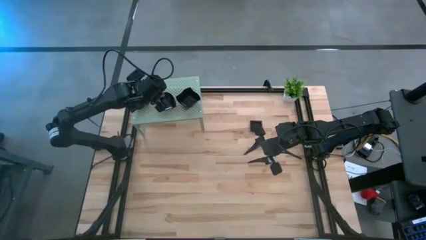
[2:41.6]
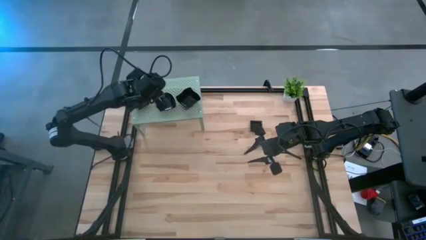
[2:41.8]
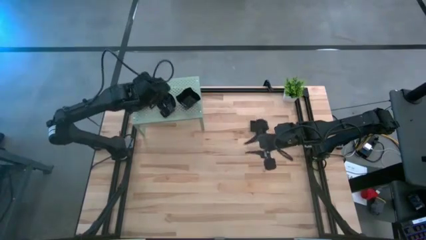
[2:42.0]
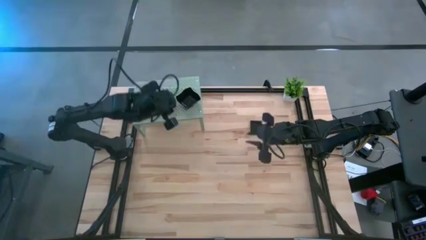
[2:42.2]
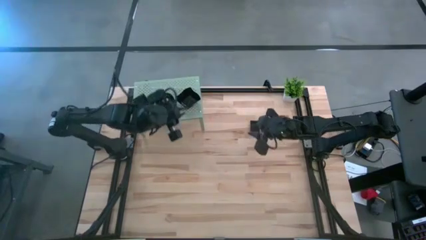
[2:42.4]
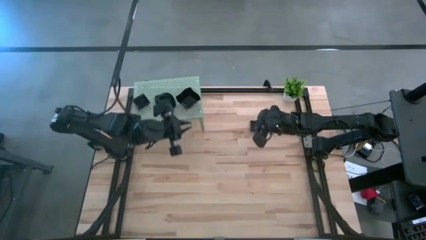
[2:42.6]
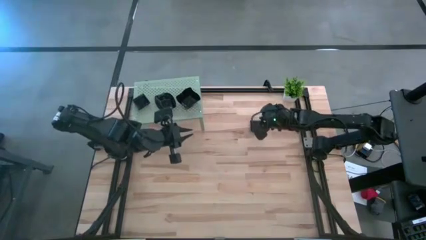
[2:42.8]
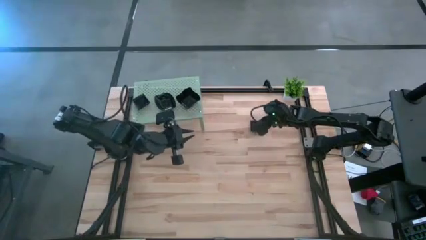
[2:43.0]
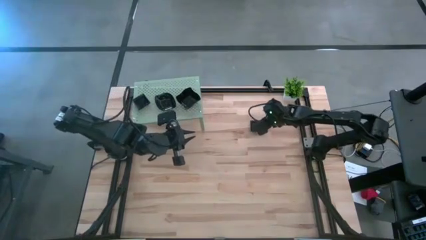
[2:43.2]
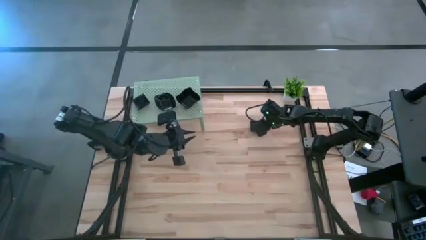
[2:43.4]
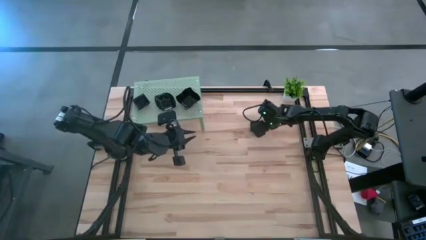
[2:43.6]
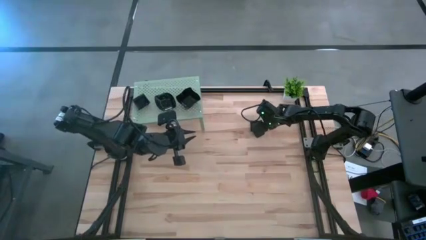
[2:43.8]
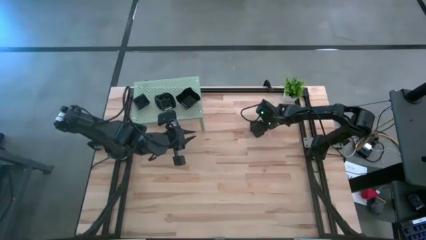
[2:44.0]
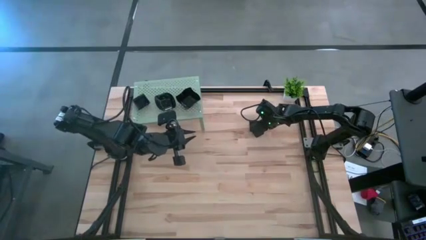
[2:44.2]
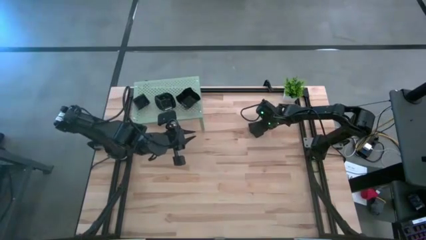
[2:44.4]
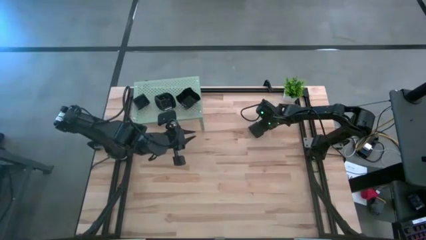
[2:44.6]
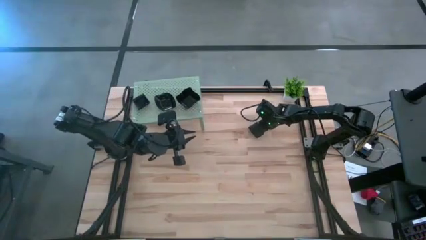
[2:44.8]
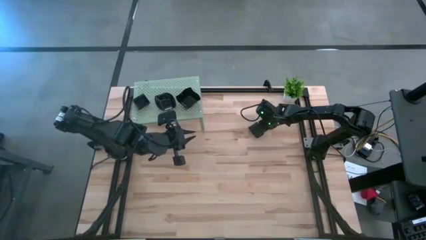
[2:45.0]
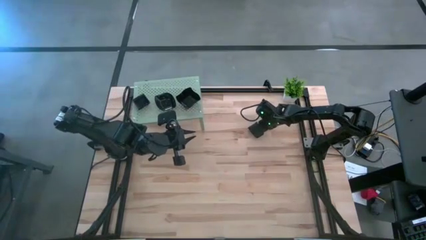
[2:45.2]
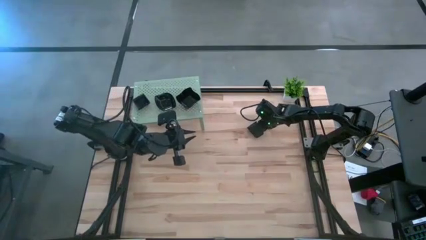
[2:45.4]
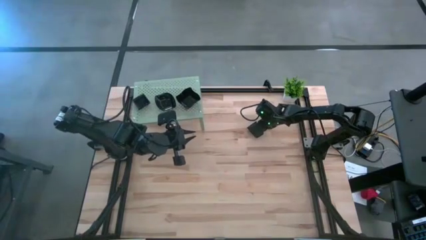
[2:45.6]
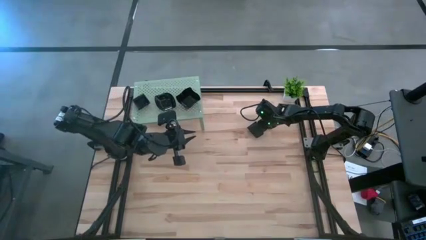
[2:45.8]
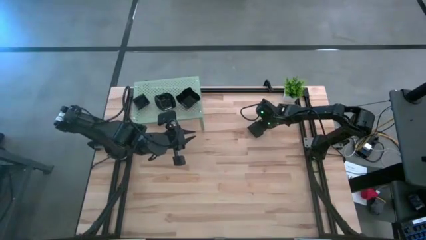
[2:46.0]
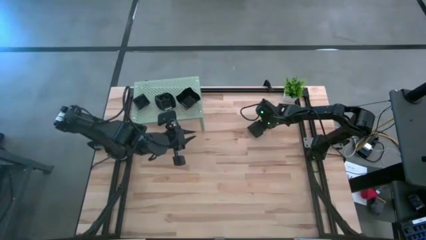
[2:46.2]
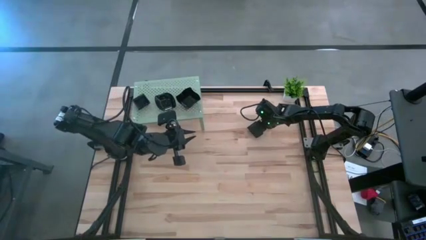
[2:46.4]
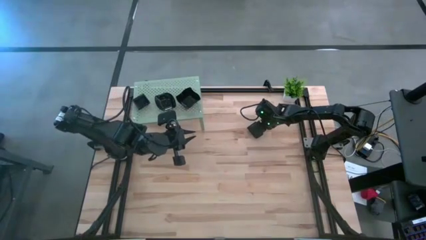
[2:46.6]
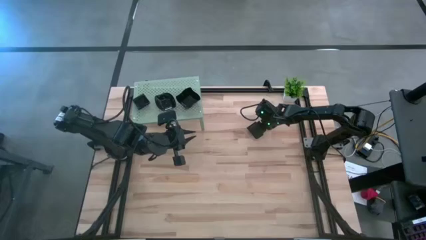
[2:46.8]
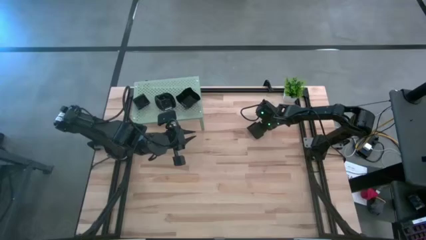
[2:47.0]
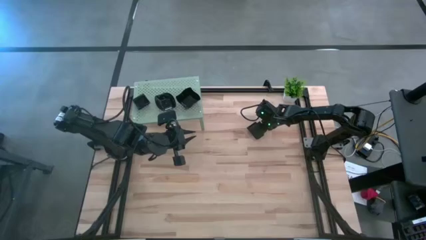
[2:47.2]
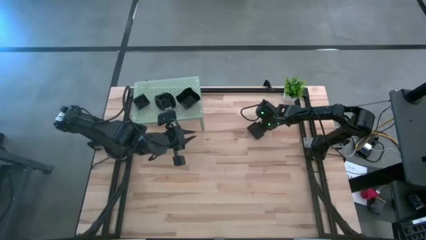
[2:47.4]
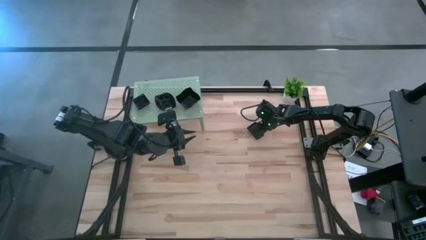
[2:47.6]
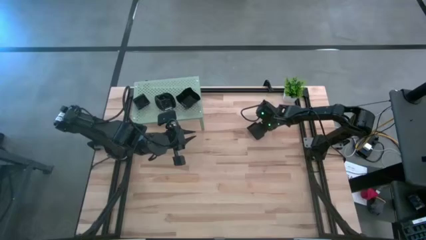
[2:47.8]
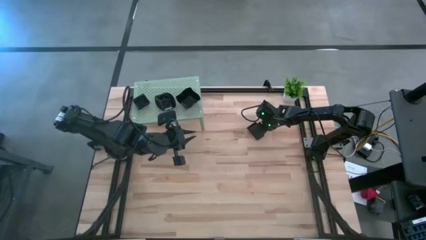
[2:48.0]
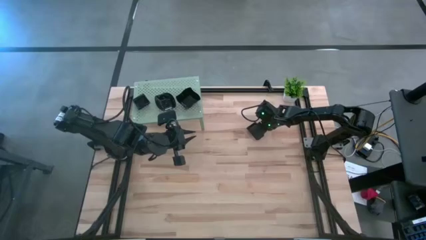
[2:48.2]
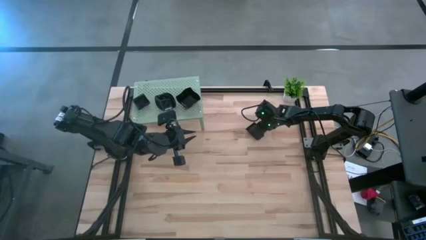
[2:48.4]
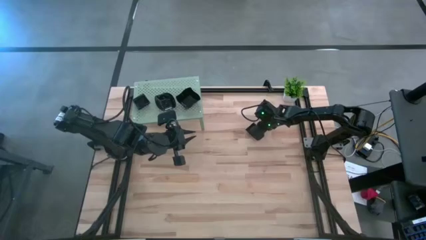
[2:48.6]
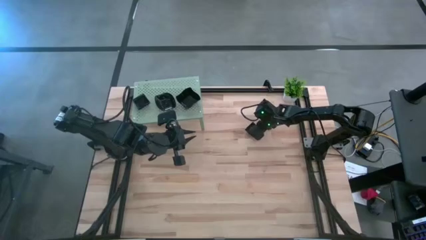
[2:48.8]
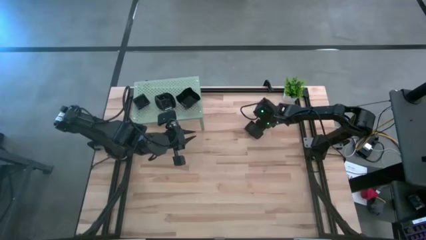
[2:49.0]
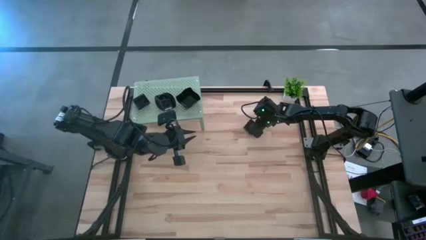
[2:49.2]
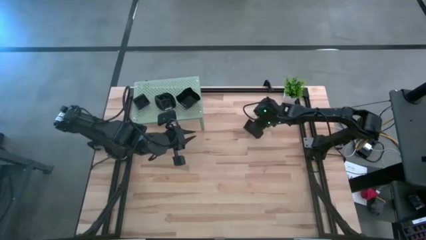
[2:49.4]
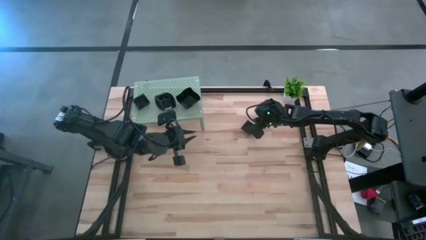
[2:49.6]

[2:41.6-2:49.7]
Task: Pick & Place Mini shaped plates
Stack the black square shaped plate on top of the square shaped plate on the shelf

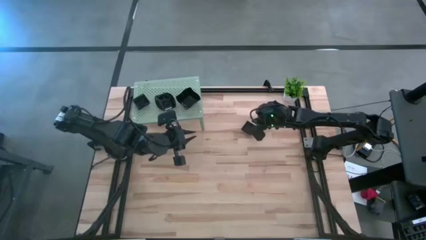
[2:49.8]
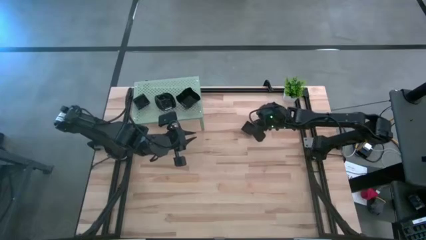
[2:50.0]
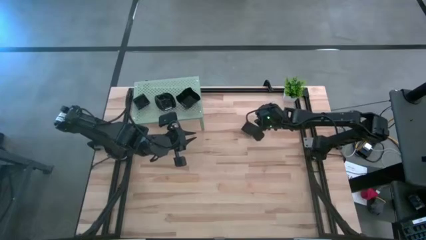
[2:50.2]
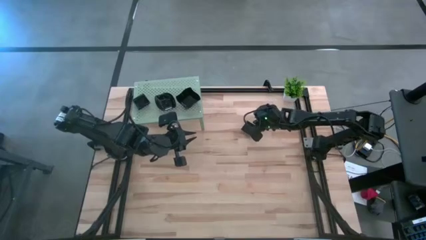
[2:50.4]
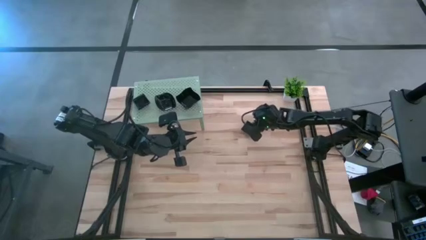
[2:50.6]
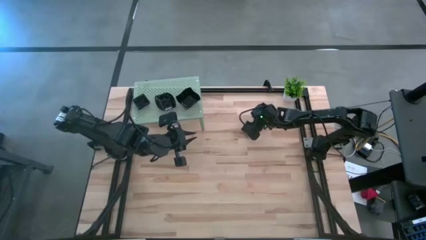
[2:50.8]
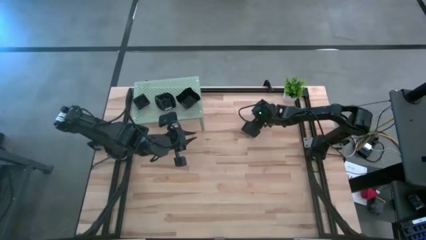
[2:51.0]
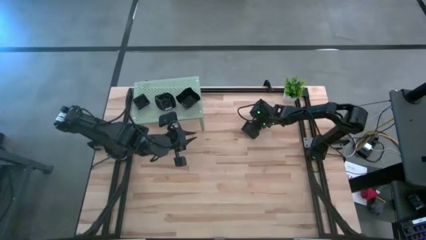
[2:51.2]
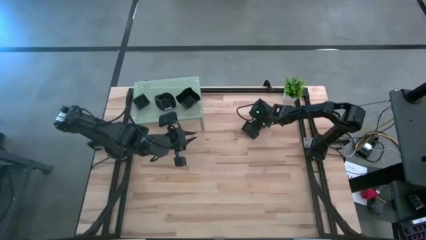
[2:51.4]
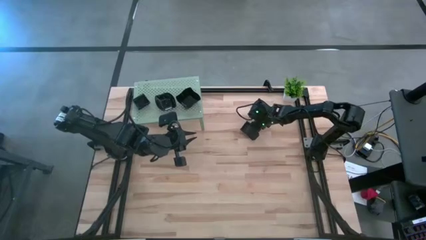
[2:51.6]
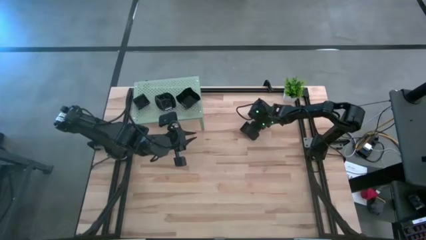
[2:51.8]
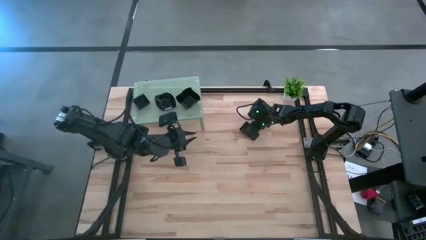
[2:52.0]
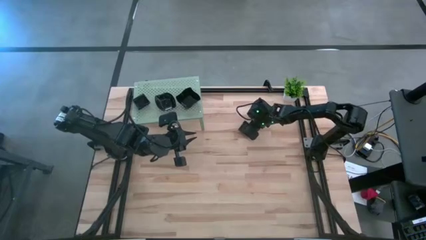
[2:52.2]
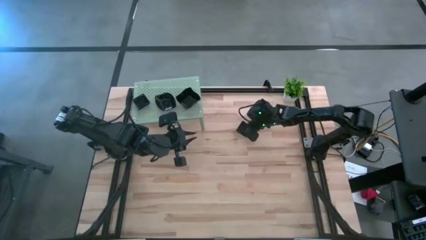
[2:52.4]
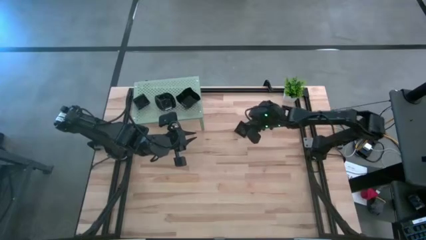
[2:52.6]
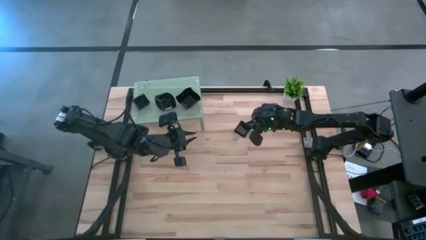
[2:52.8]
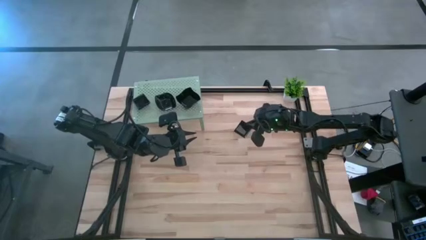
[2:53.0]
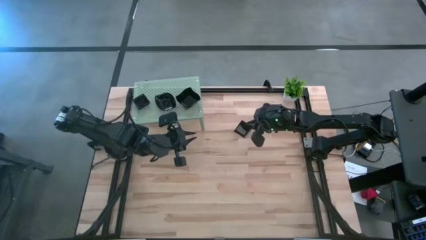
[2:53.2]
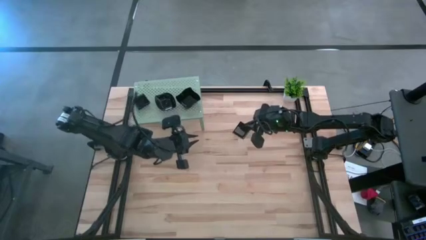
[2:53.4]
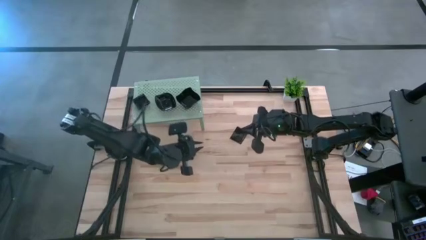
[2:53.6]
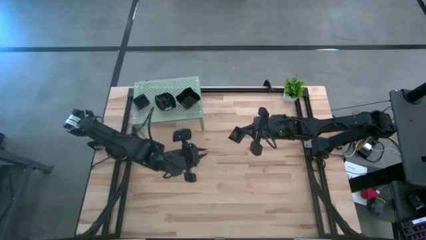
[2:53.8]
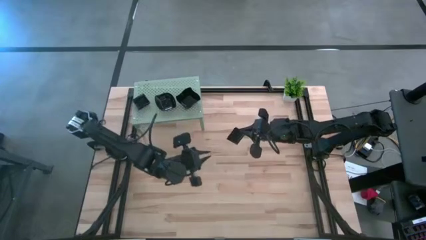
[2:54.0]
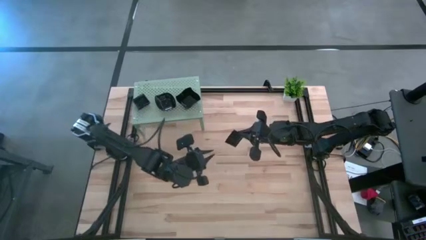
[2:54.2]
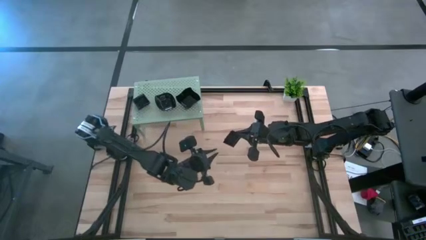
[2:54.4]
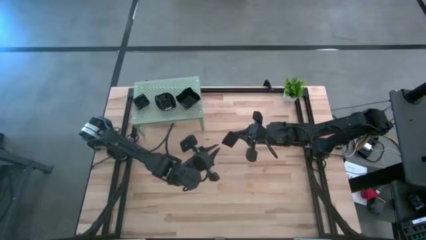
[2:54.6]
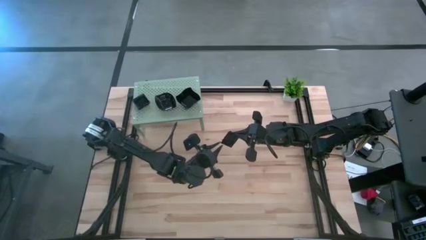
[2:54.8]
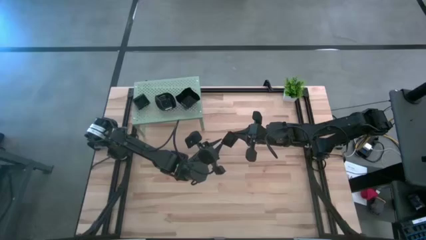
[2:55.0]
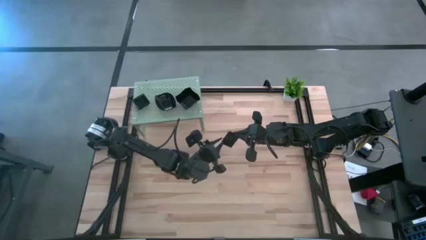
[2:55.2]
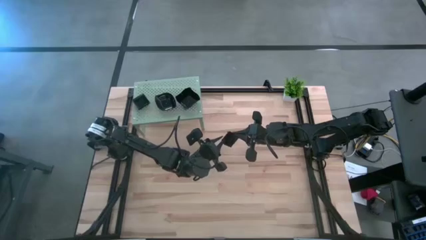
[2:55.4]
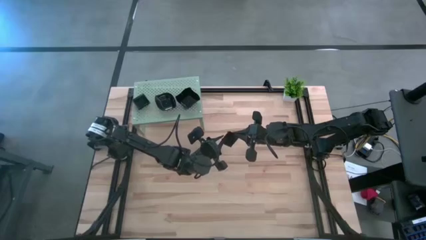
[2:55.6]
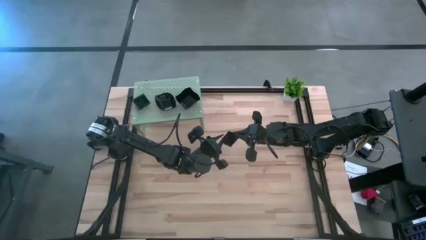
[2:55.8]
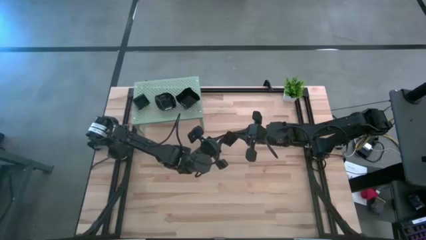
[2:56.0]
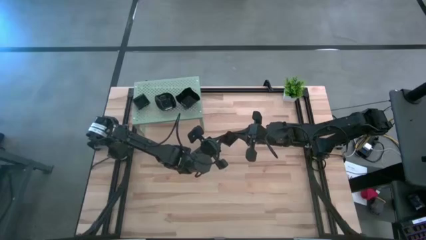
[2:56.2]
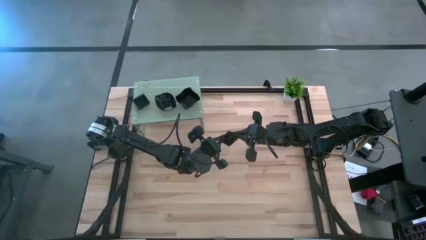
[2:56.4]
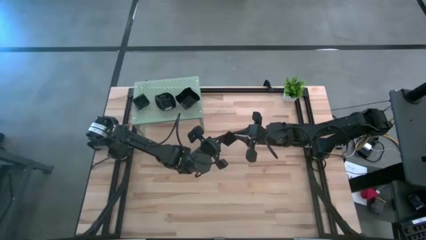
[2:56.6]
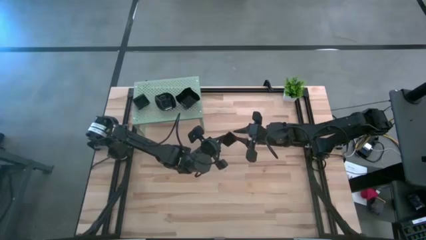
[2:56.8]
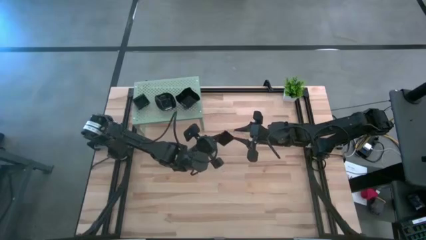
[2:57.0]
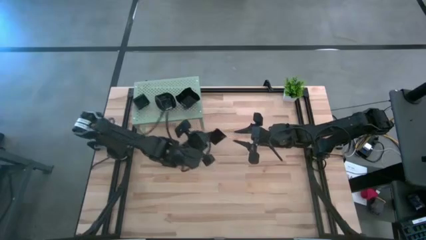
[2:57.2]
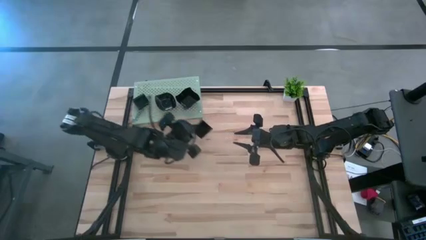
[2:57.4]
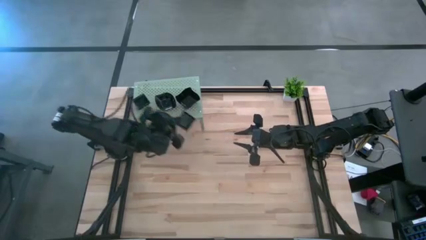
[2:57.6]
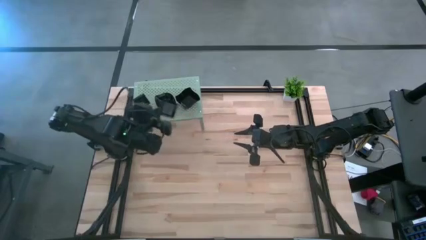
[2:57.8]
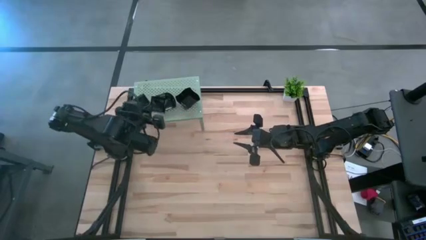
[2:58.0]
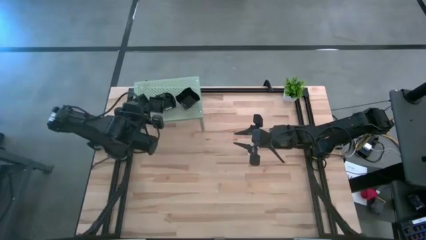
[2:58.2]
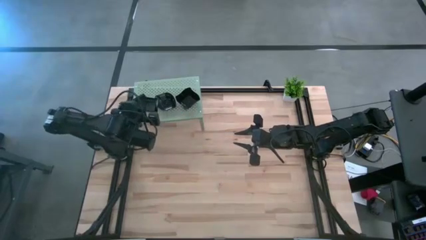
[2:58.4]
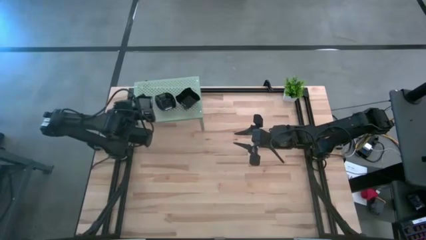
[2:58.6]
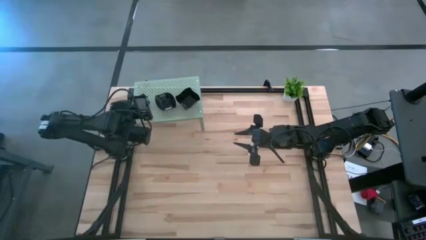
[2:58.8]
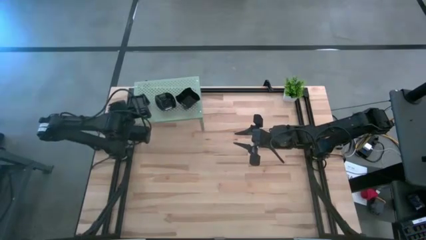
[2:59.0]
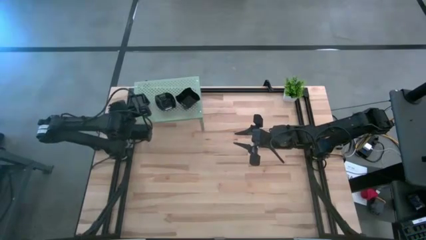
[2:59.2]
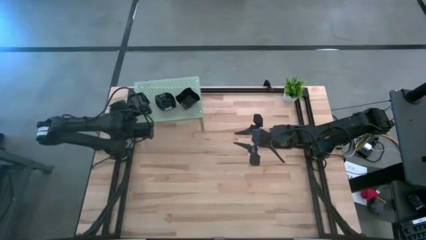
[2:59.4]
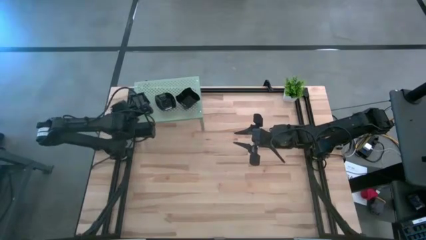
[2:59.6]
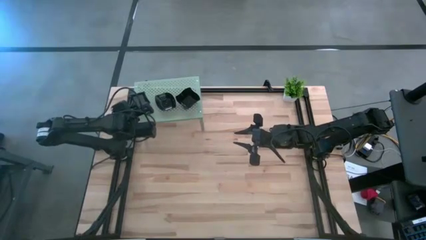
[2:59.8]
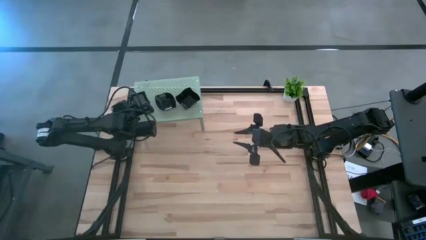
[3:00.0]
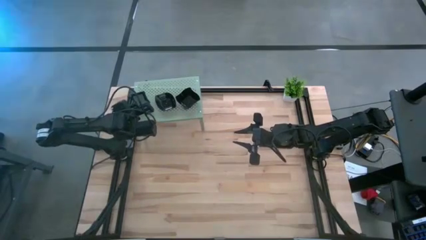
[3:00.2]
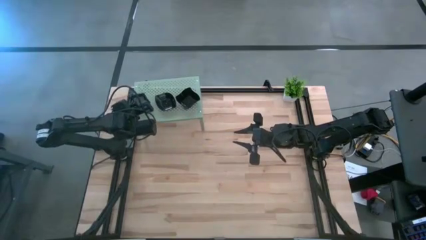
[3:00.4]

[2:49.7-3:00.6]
Stack the black square shaped plate on top of the square shaped plate on the shelf
